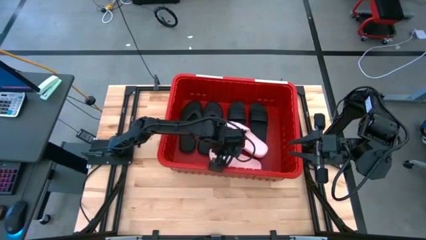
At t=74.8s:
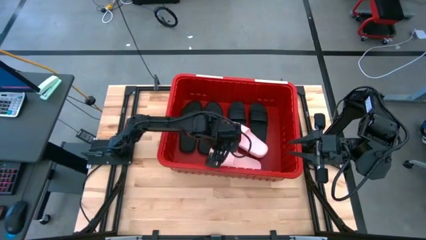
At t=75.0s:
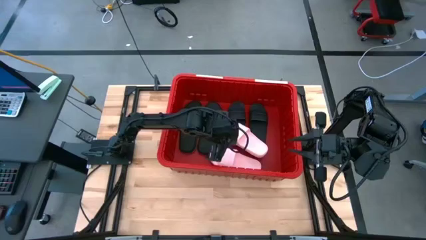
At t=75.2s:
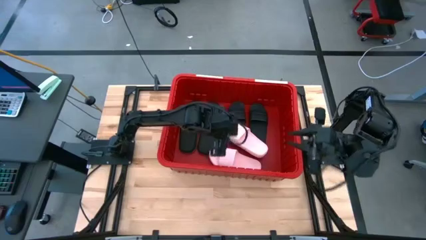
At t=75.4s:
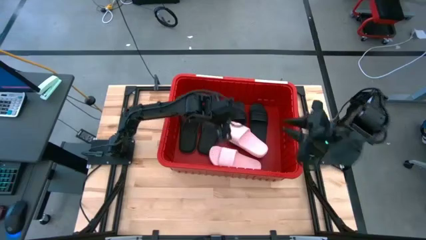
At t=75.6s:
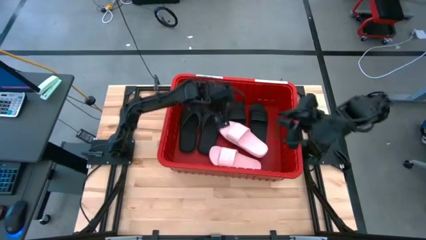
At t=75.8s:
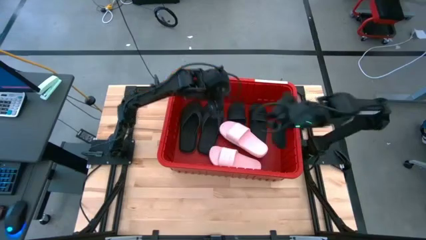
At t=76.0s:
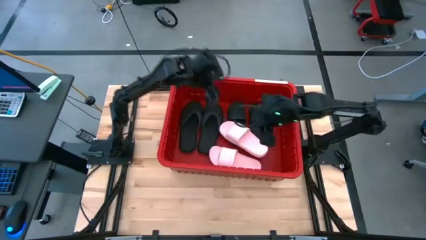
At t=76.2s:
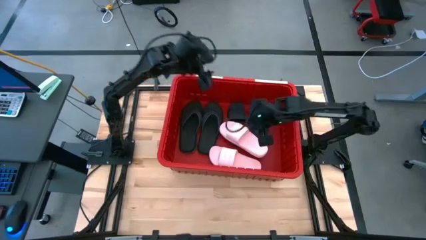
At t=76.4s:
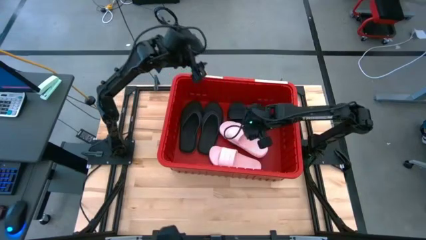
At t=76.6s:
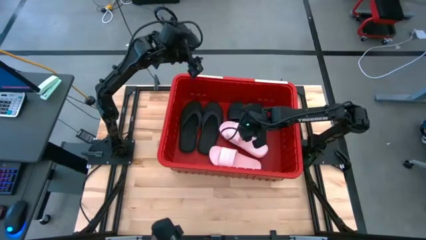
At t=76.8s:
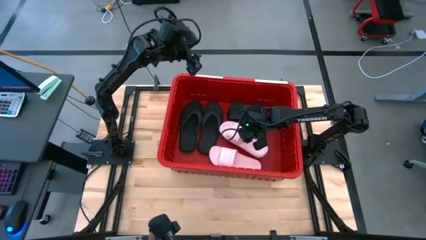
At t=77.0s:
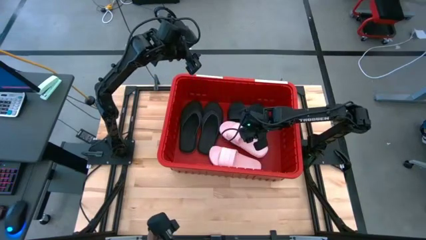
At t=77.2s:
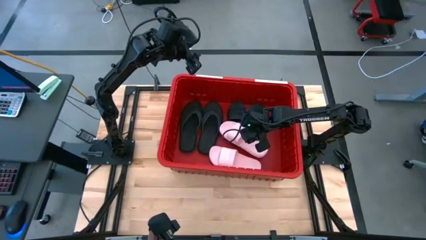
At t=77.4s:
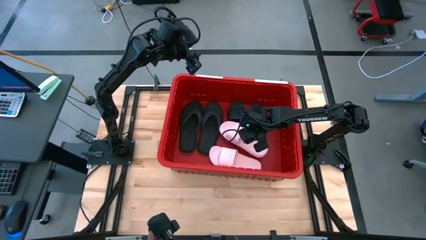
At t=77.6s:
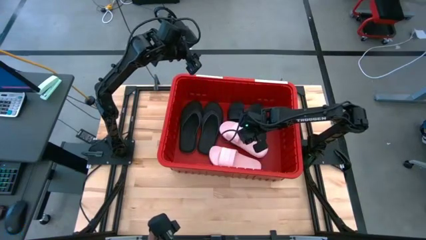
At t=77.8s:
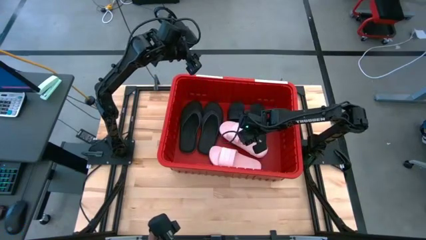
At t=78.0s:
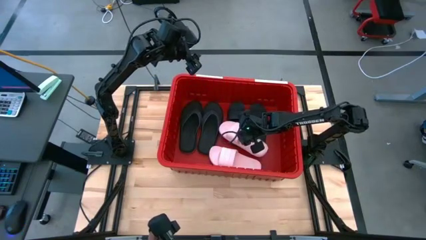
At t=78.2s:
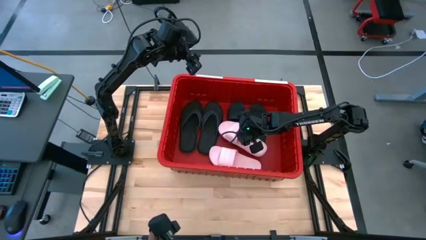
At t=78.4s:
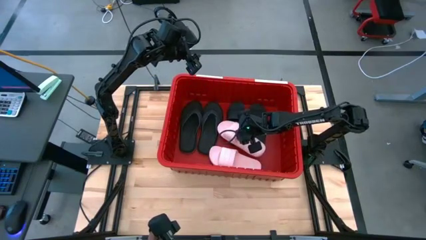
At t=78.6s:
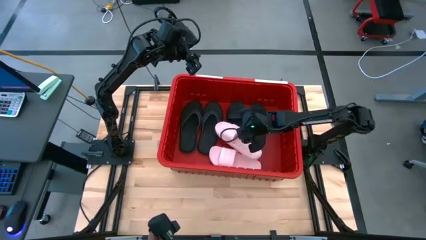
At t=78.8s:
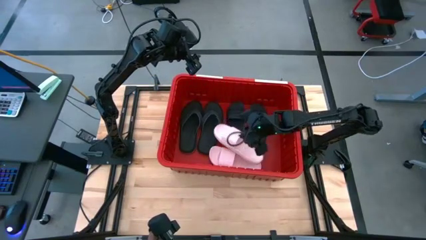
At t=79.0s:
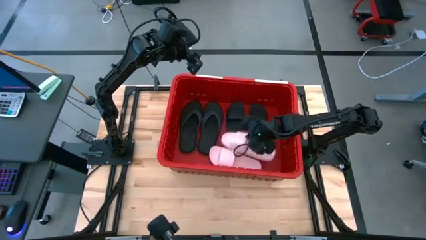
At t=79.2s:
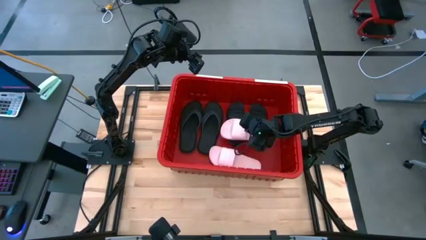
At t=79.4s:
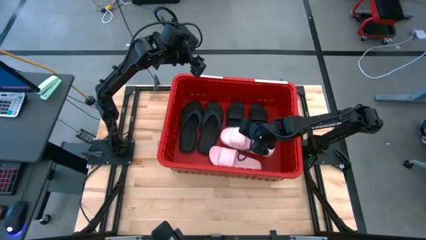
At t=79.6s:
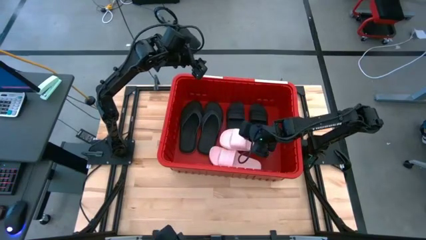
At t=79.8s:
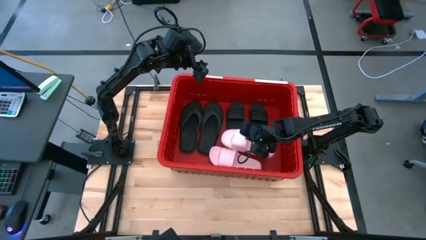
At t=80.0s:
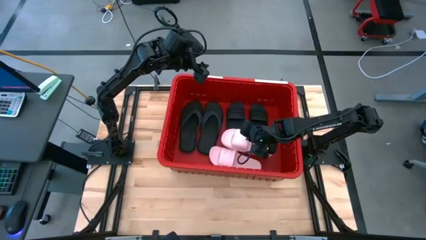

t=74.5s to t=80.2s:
Task: Pick and place slides into bin
Adjust the pink slide into the red bin

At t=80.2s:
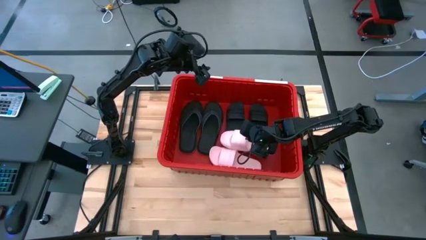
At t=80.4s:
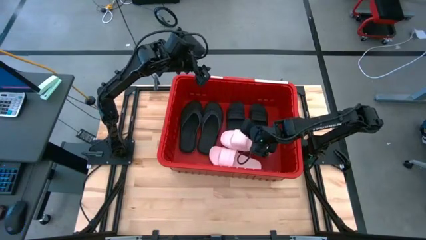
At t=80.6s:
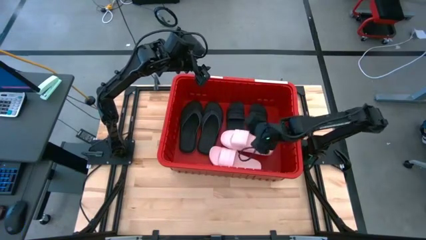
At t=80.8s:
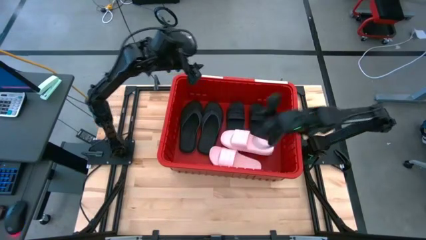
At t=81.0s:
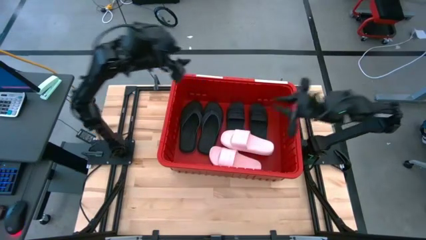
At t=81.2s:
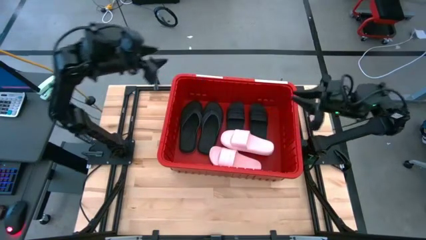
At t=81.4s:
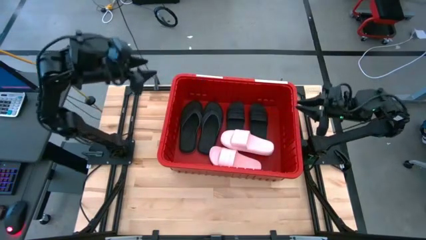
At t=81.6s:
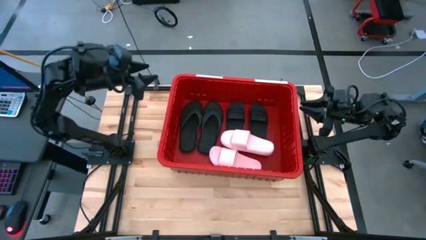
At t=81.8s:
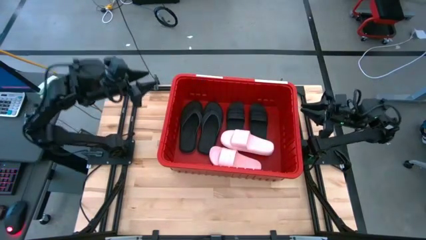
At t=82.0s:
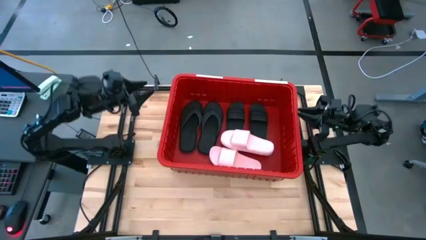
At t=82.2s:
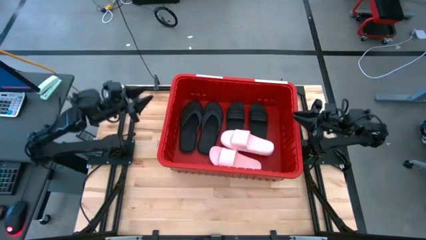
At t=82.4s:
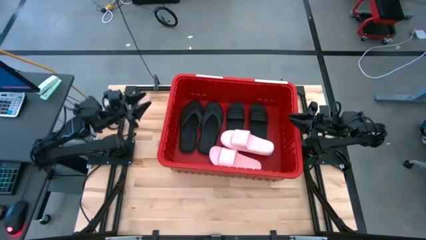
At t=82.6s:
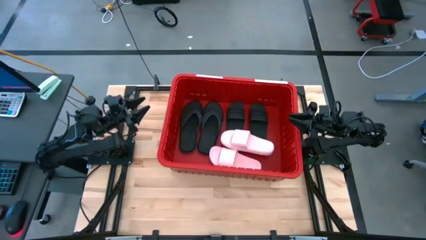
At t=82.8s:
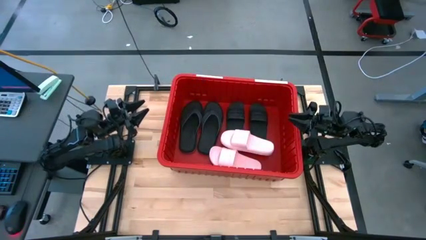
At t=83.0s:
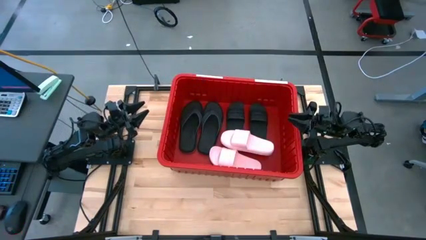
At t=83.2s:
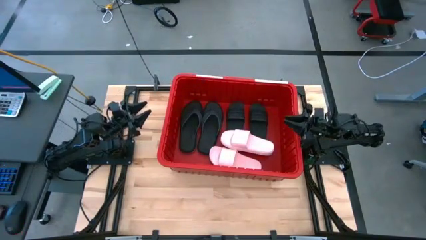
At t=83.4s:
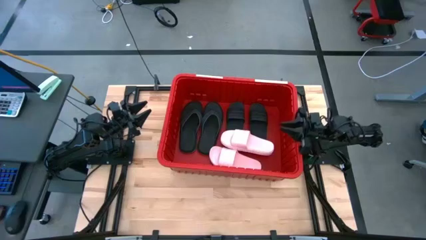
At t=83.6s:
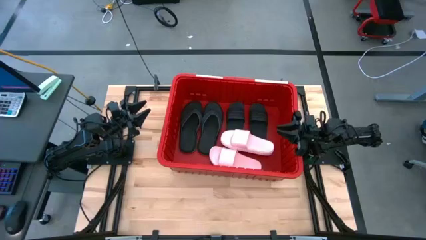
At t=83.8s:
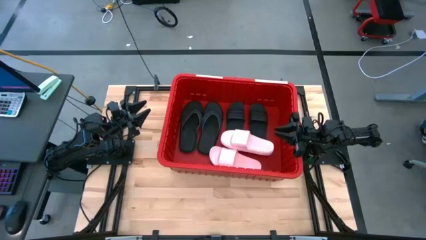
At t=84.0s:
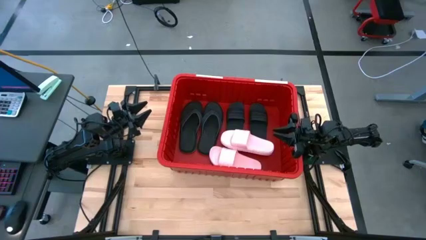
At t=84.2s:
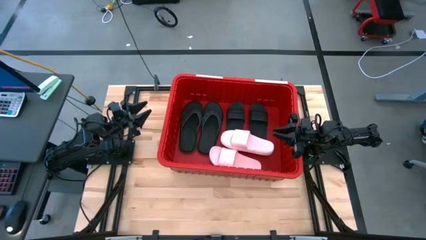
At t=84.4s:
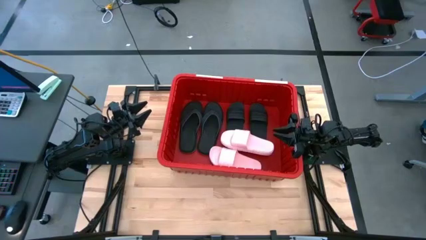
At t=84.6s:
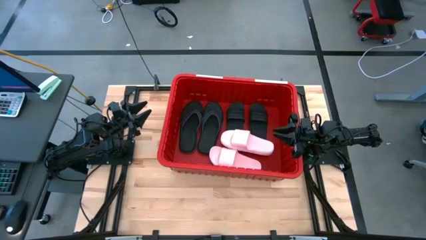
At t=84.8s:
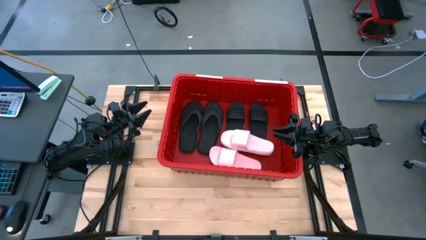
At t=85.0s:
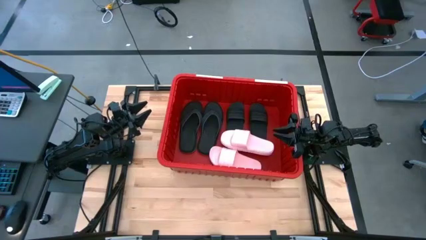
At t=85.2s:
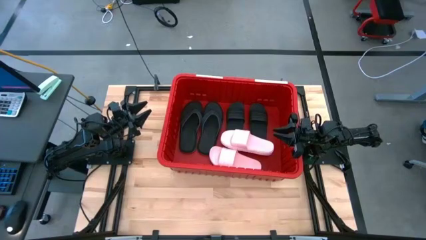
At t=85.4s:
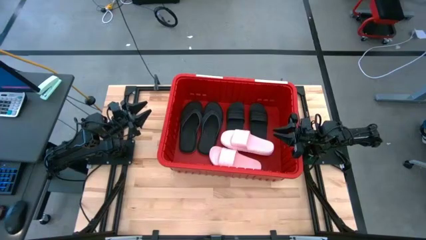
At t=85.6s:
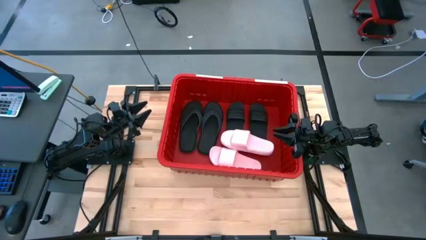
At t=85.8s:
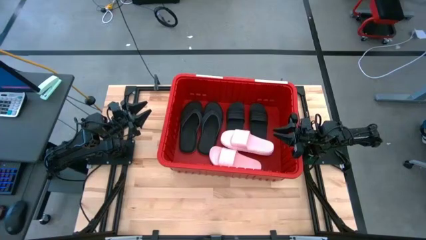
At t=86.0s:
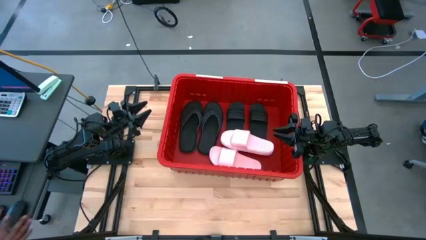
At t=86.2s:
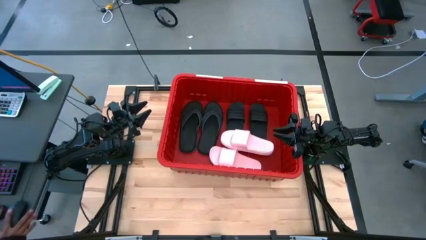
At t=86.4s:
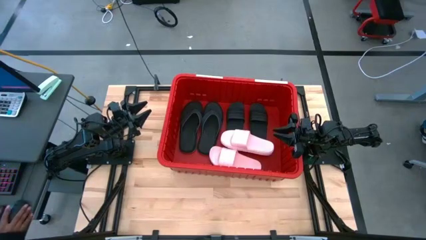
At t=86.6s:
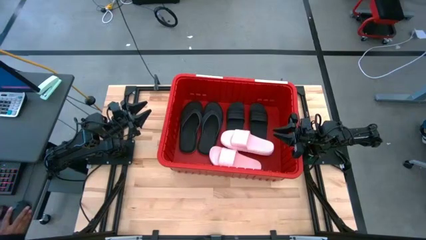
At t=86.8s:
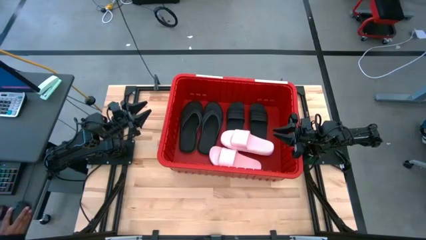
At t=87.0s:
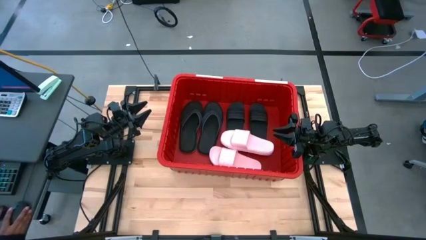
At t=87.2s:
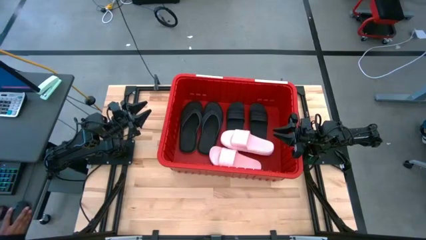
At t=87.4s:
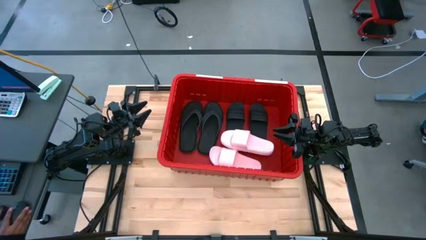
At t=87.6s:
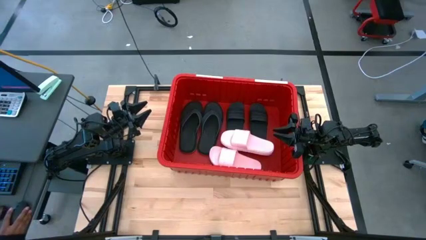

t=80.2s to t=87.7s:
Return to Home Position
